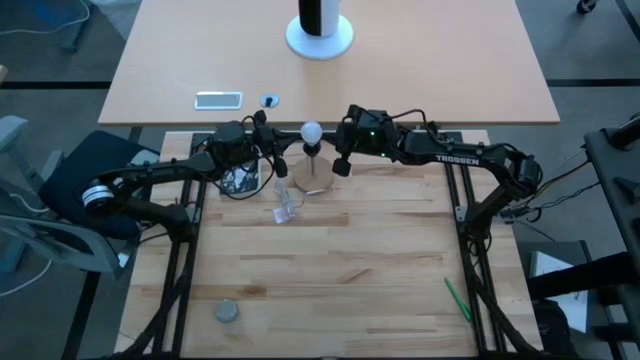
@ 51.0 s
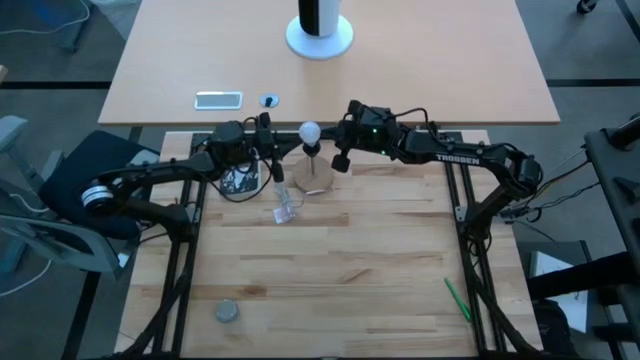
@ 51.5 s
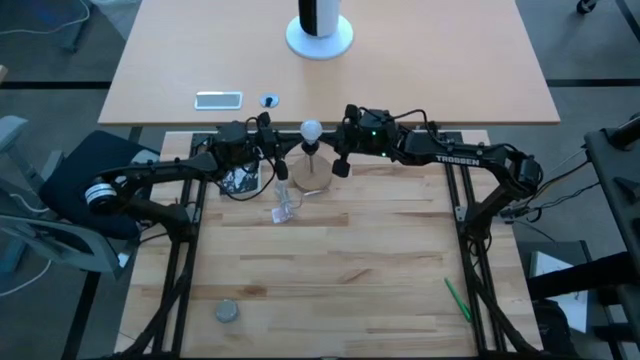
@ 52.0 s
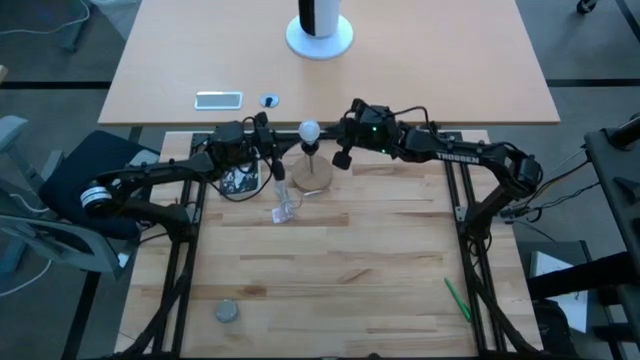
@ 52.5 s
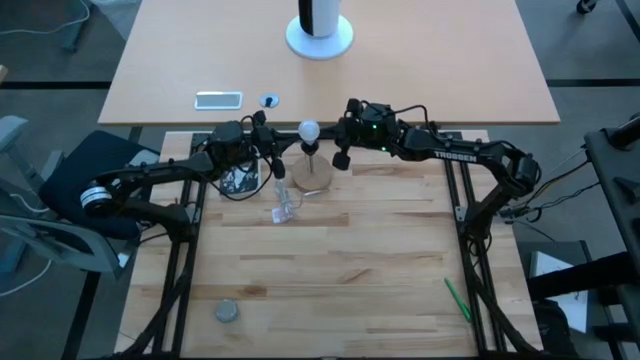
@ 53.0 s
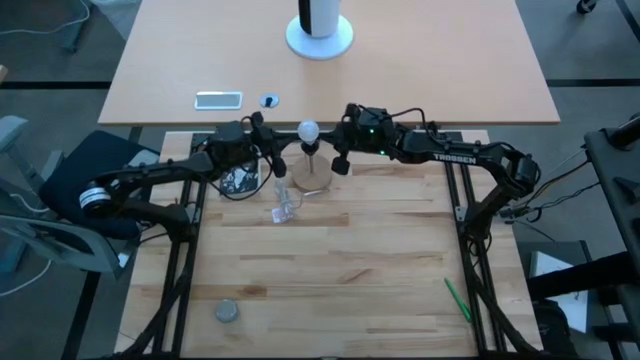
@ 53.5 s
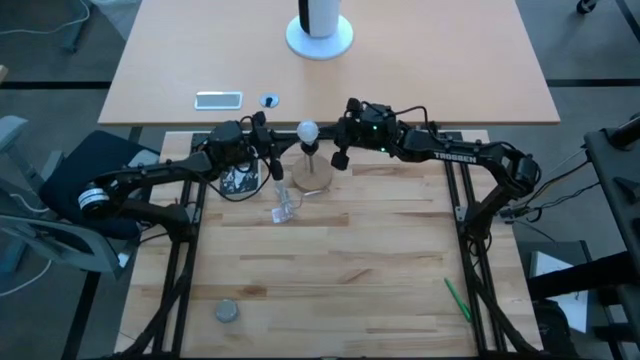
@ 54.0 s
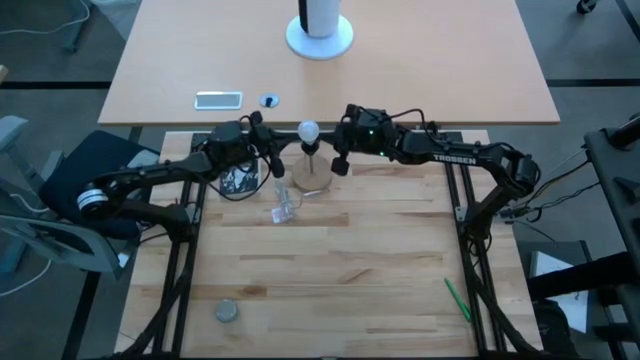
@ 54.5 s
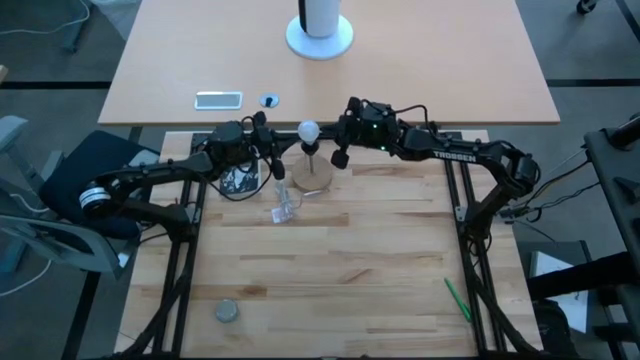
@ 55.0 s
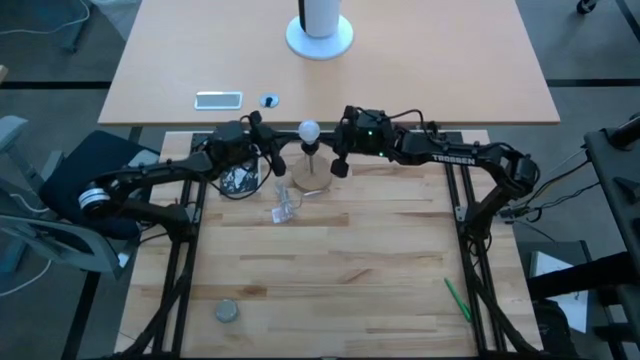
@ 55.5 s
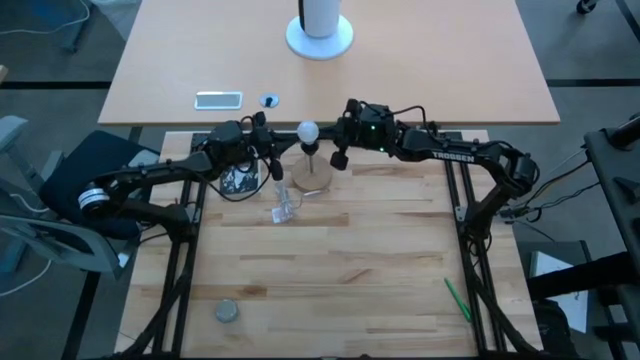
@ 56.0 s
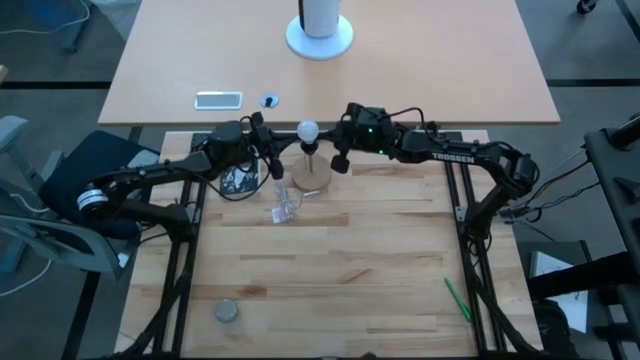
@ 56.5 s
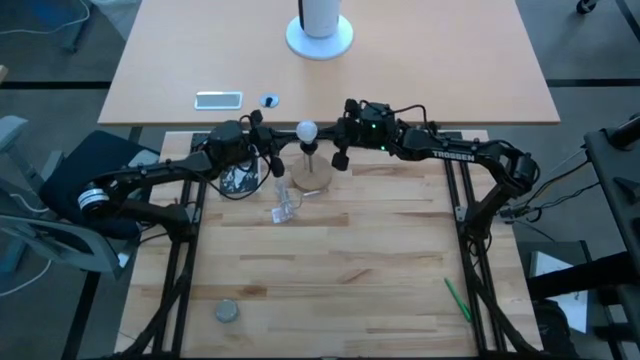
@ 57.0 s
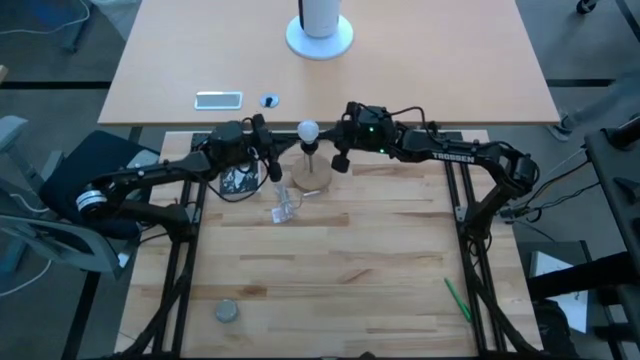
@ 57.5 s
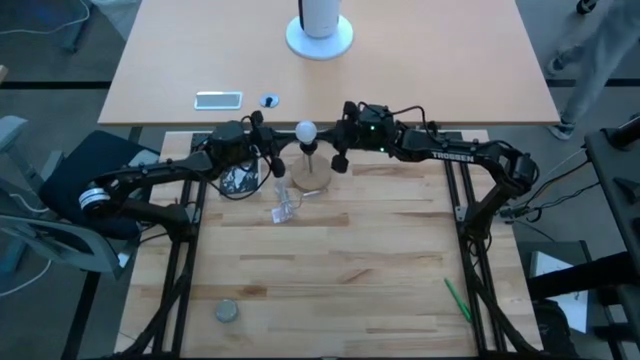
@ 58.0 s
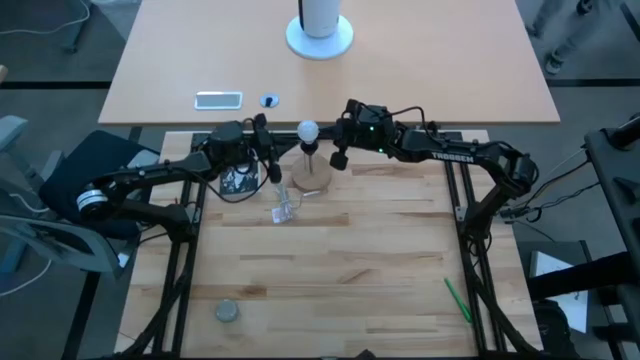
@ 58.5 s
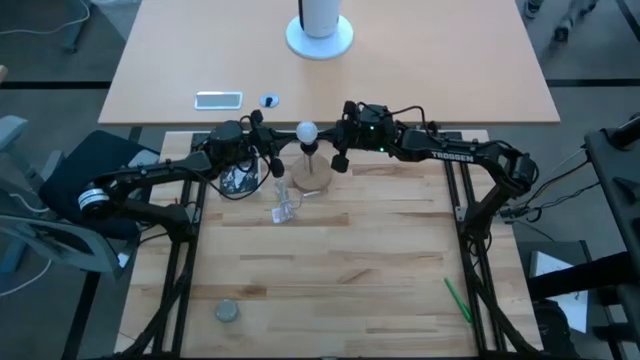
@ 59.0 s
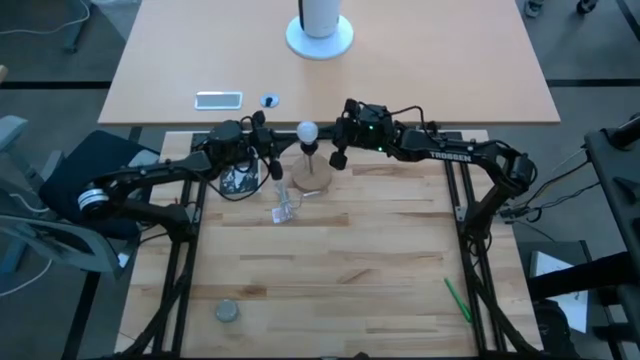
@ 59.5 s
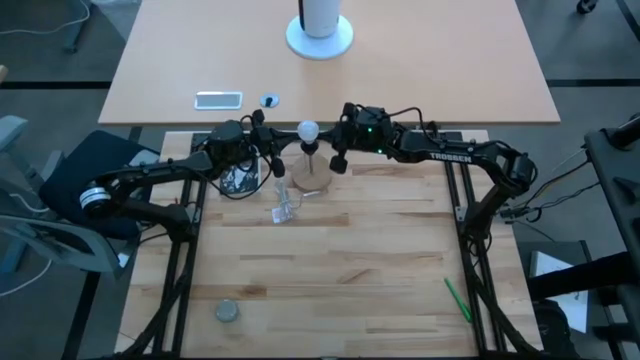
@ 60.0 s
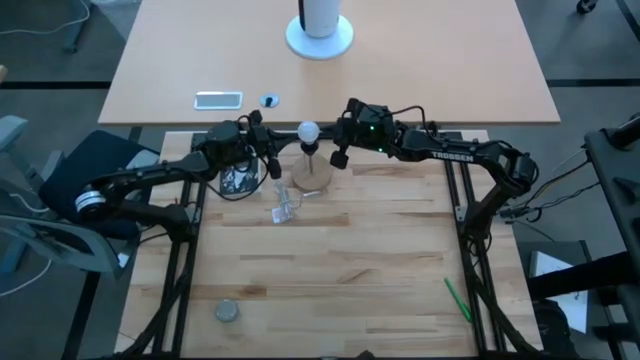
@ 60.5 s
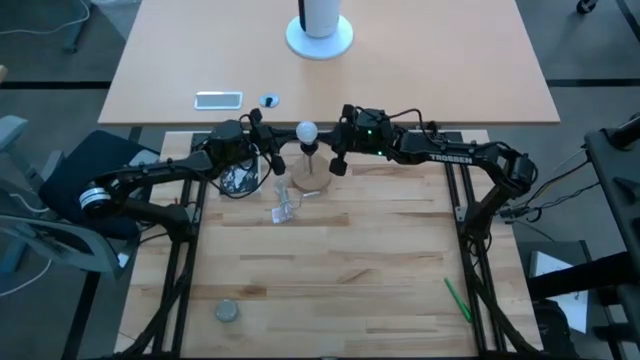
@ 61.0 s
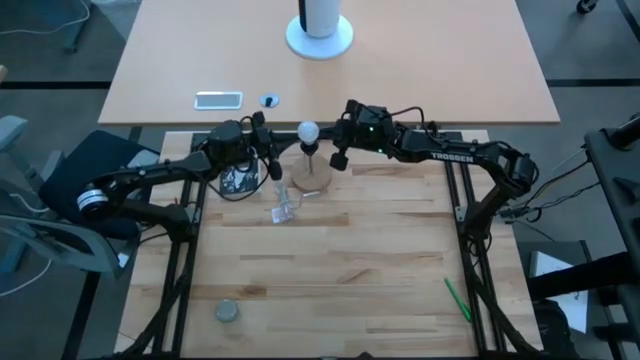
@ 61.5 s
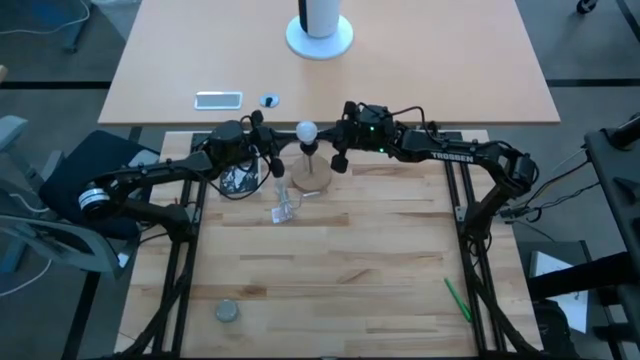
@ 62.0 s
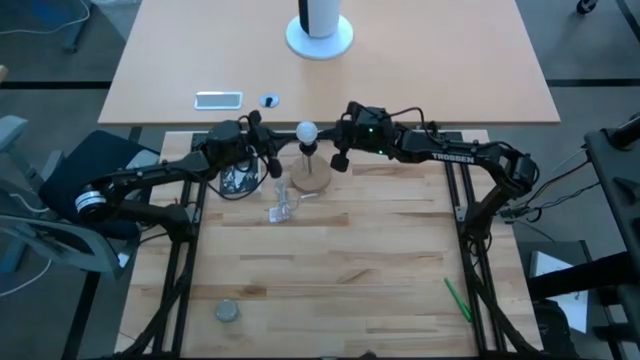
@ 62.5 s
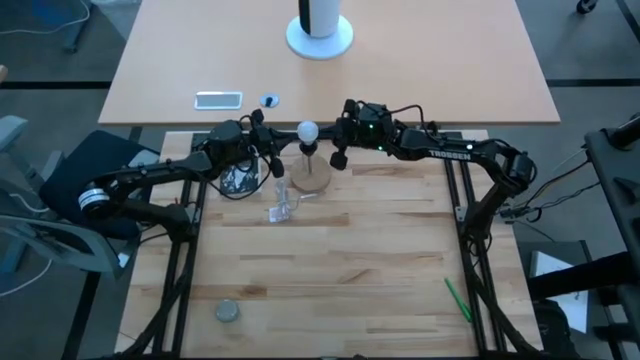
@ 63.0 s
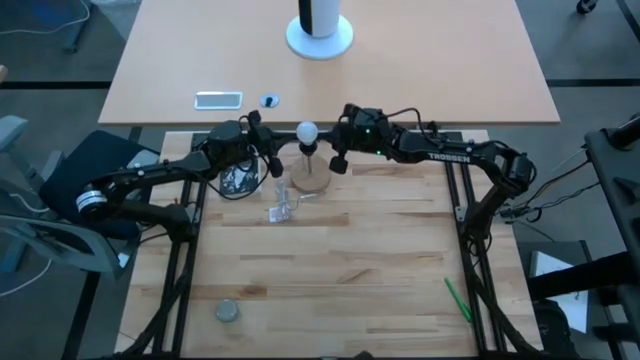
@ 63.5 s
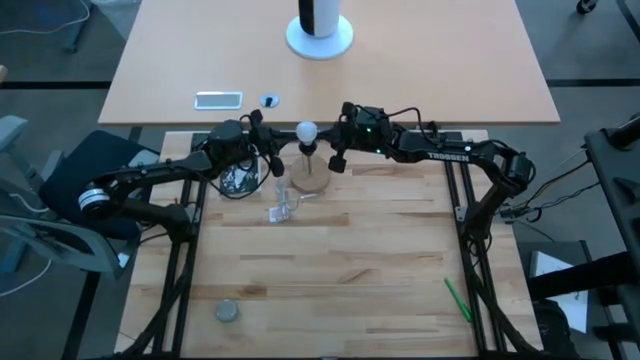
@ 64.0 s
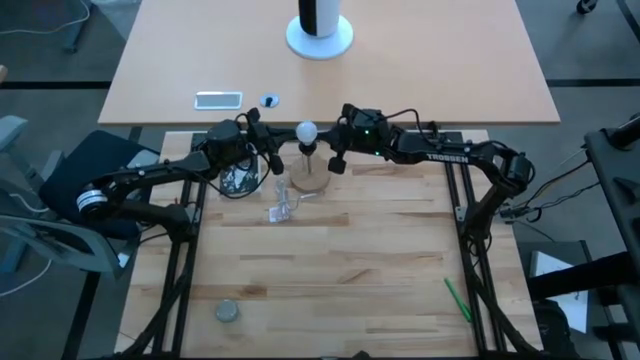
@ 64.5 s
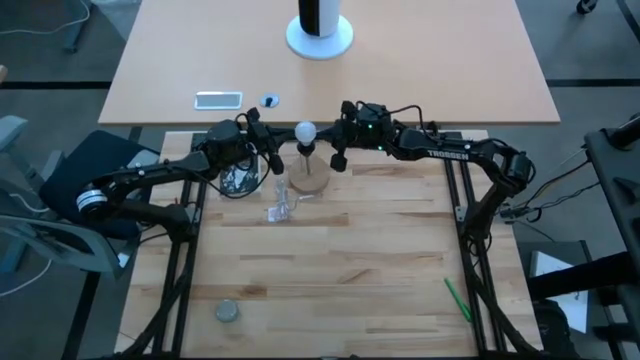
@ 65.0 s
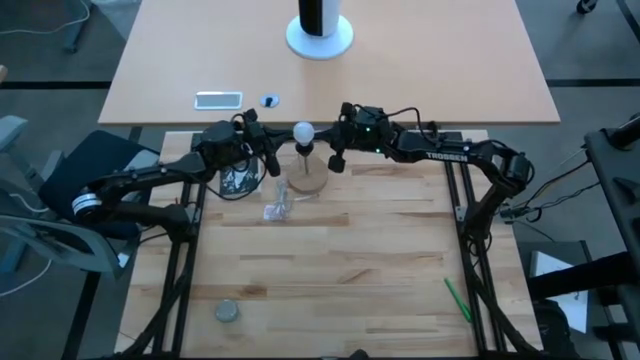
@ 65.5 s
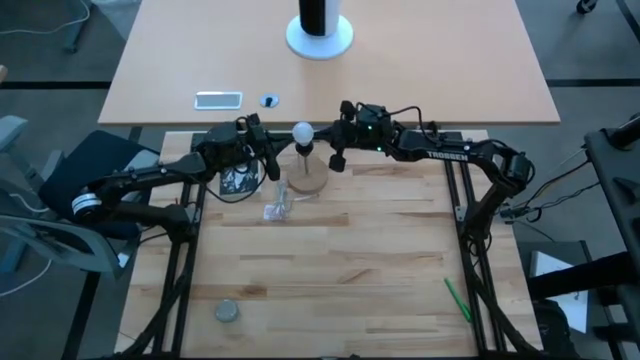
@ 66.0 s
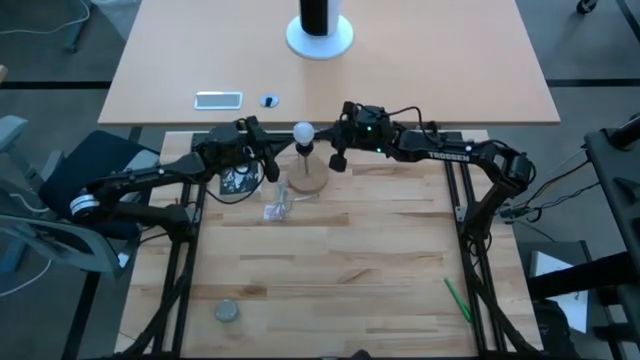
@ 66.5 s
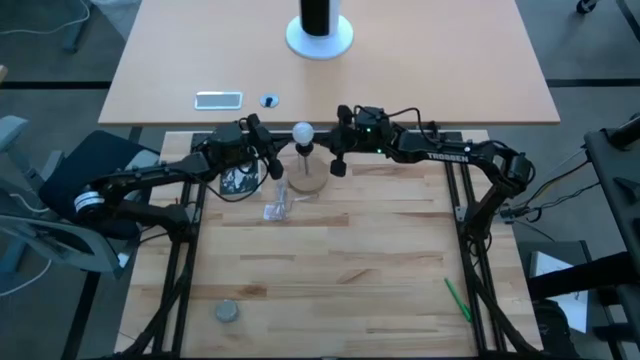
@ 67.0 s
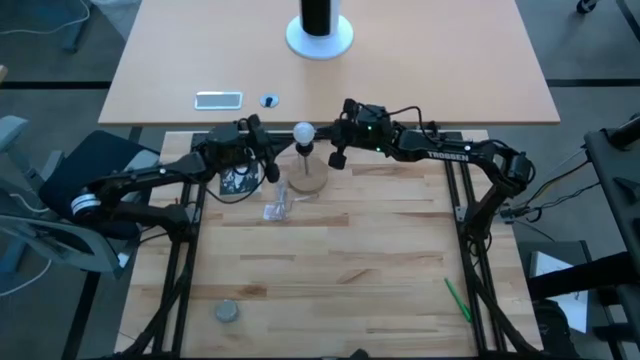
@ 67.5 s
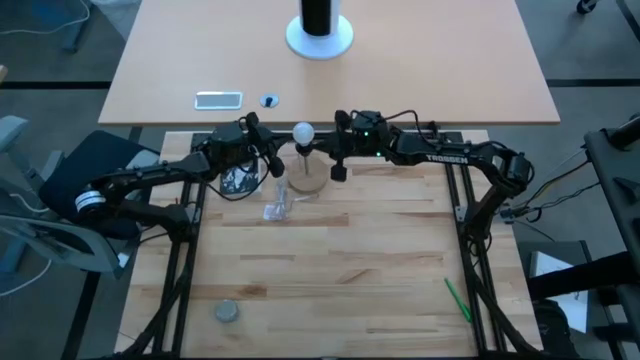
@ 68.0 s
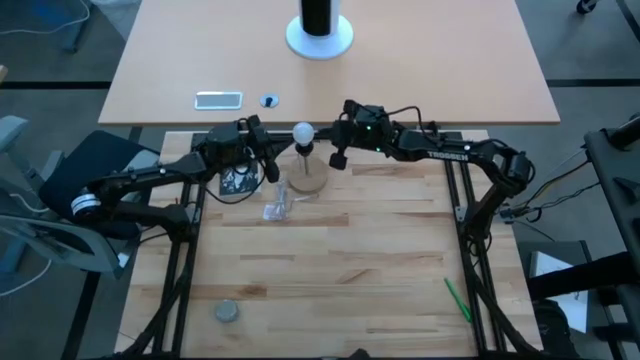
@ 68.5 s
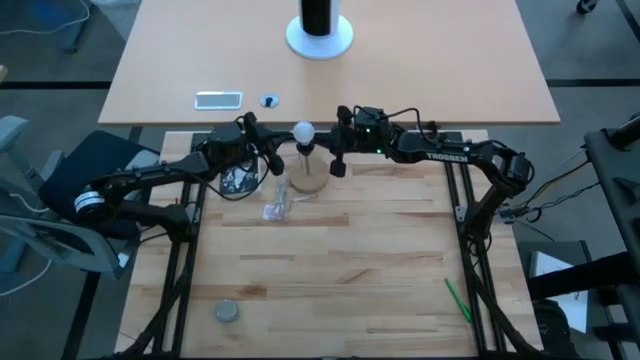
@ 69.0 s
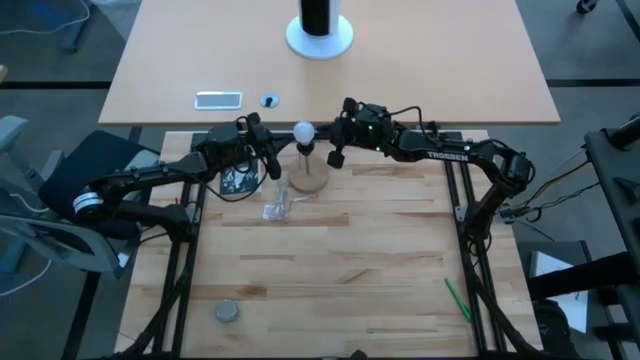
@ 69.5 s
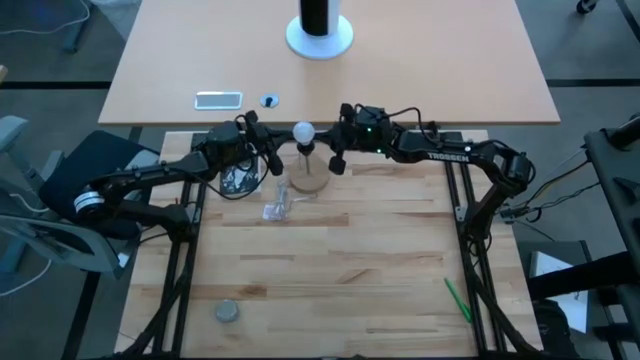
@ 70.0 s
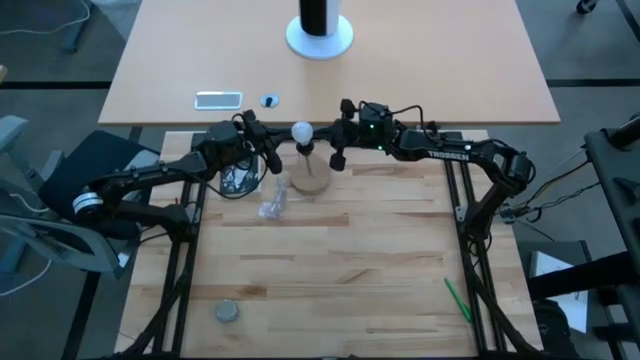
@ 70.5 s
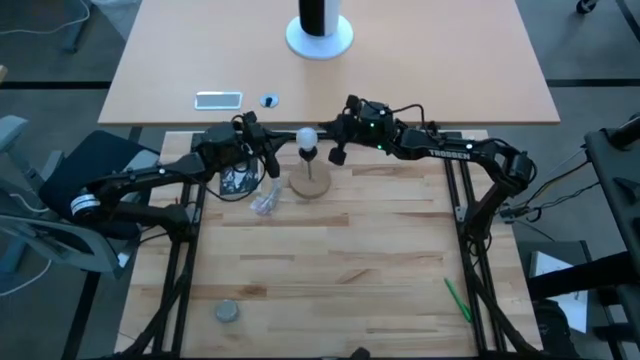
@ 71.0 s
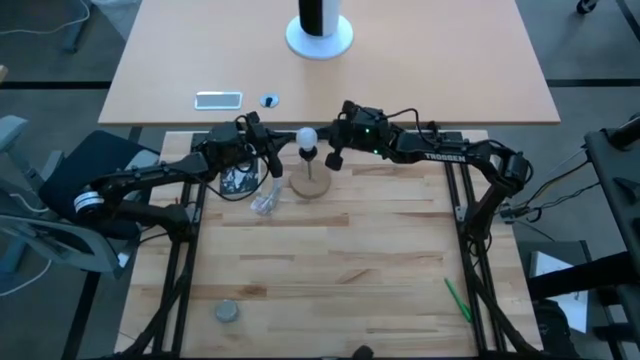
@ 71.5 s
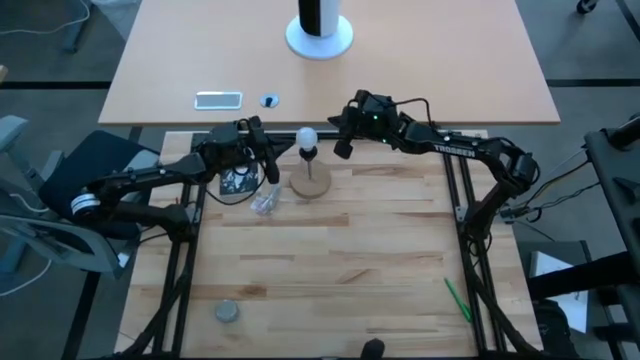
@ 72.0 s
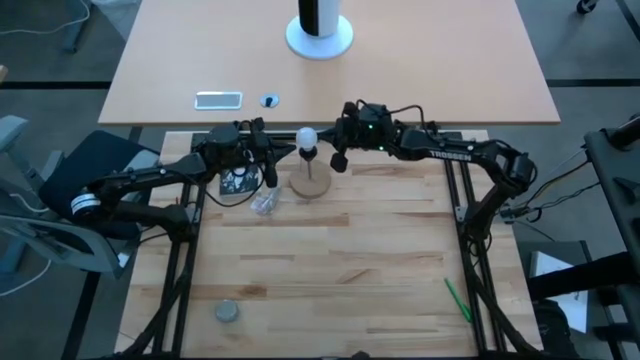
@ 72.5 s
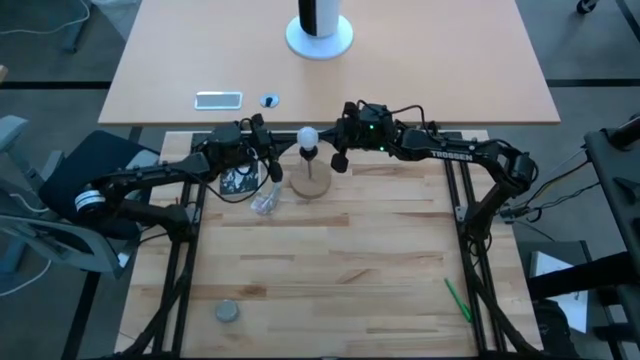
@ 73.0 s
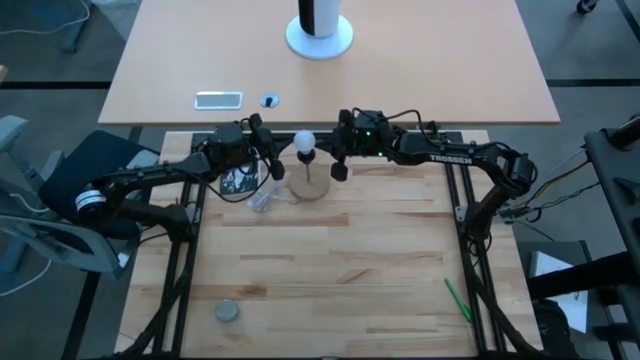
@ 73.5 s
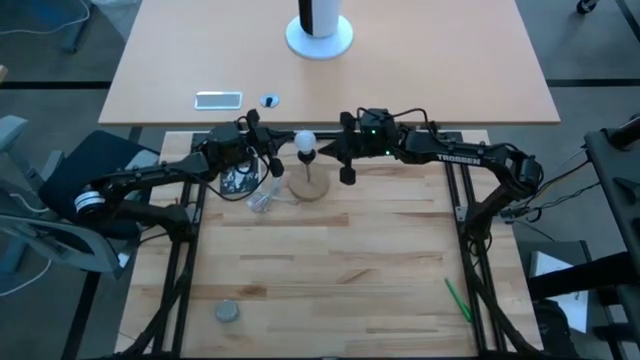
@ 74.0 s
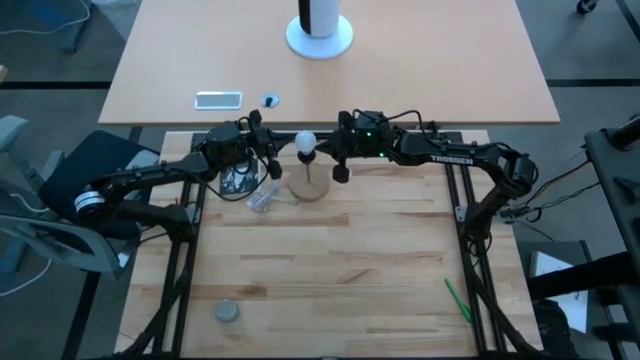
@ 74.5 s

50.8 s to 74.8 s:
Task: Screw lightbulb
Insert the lightbulb into the lamp
